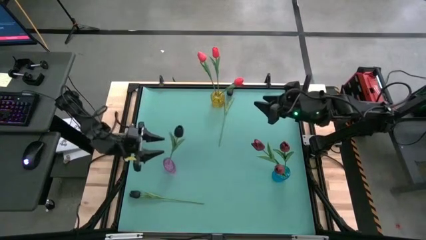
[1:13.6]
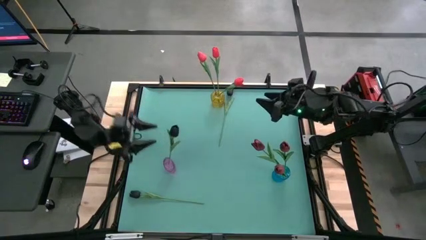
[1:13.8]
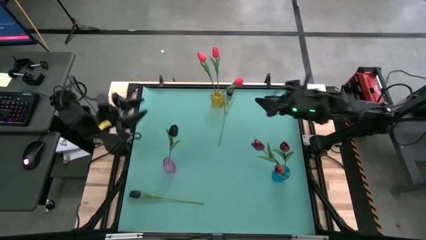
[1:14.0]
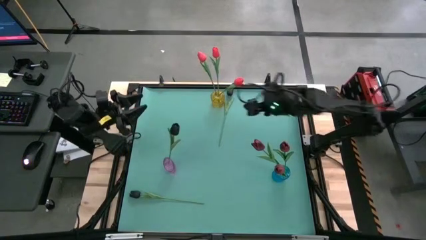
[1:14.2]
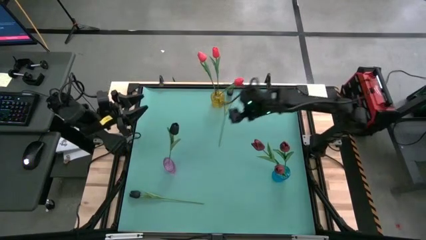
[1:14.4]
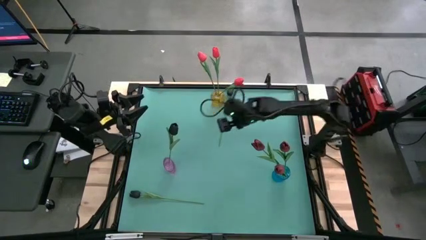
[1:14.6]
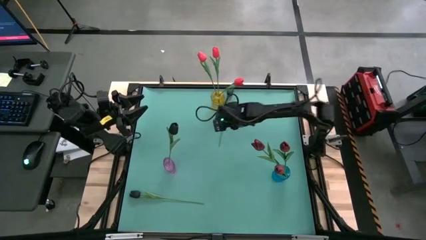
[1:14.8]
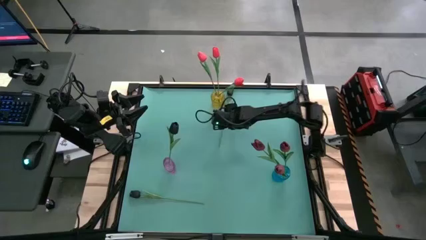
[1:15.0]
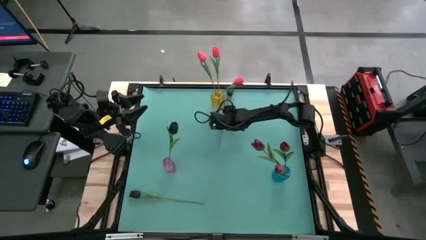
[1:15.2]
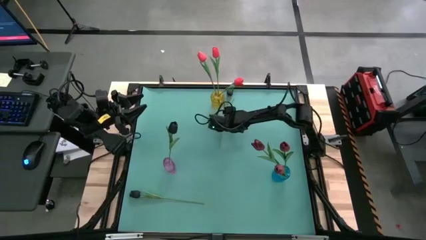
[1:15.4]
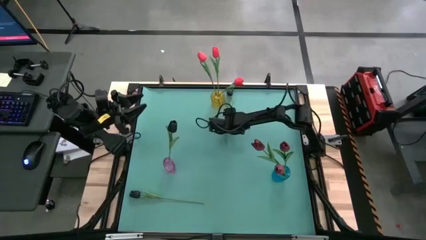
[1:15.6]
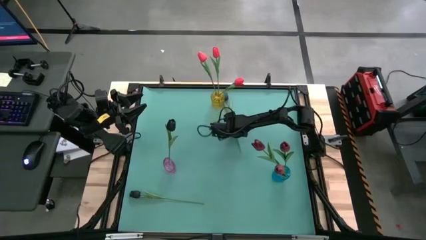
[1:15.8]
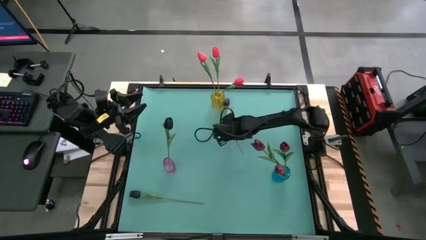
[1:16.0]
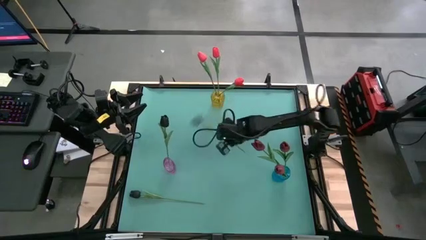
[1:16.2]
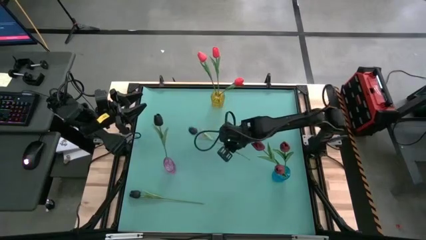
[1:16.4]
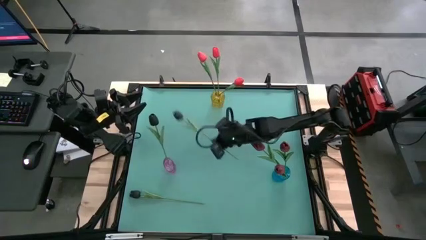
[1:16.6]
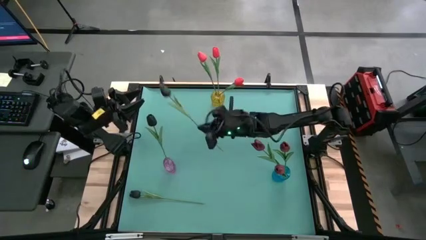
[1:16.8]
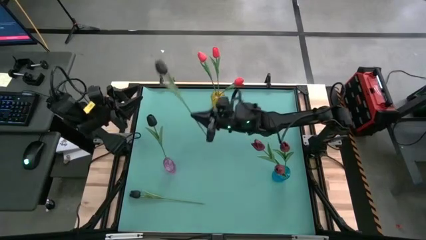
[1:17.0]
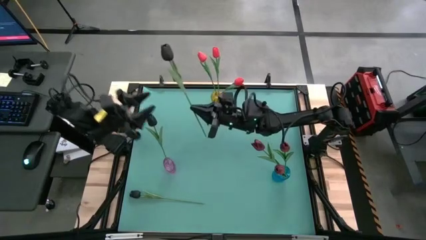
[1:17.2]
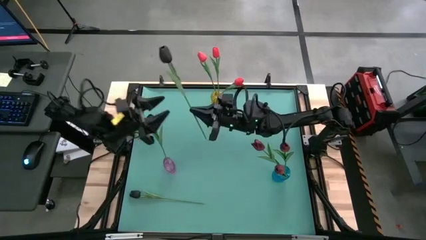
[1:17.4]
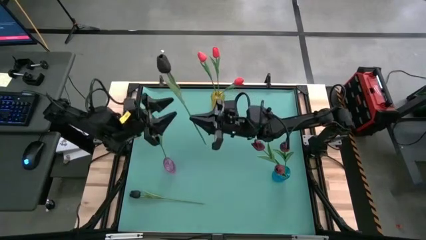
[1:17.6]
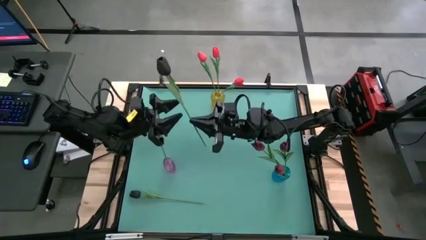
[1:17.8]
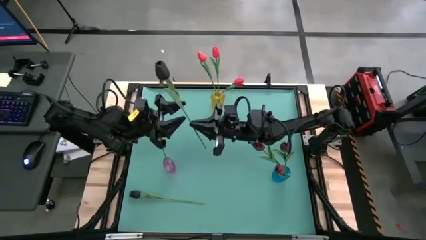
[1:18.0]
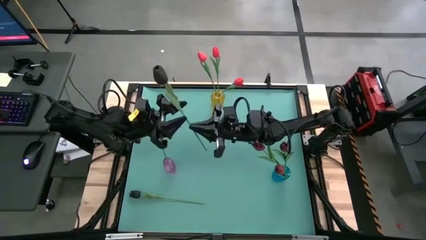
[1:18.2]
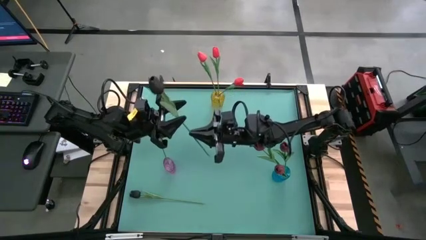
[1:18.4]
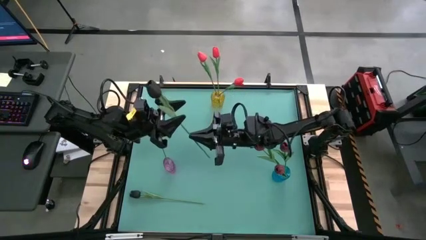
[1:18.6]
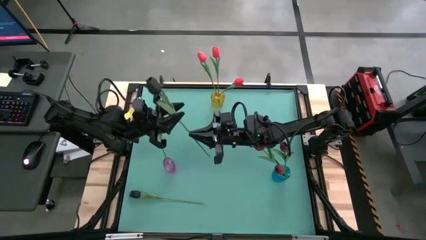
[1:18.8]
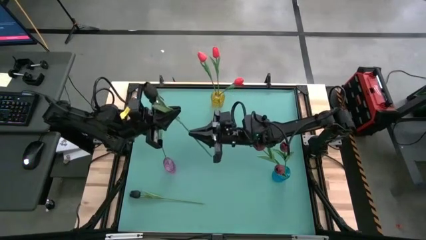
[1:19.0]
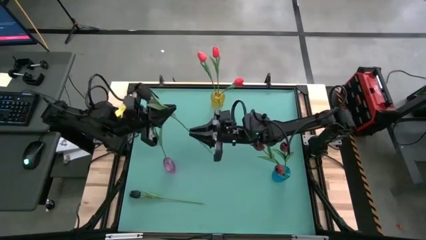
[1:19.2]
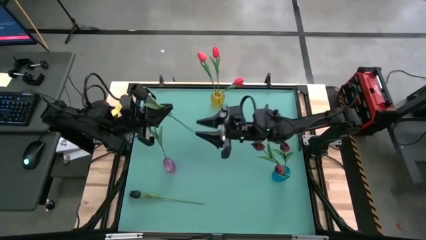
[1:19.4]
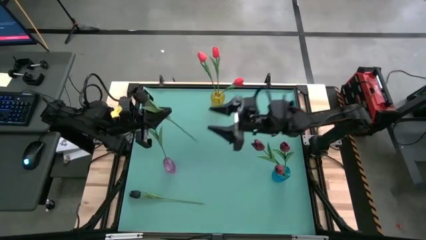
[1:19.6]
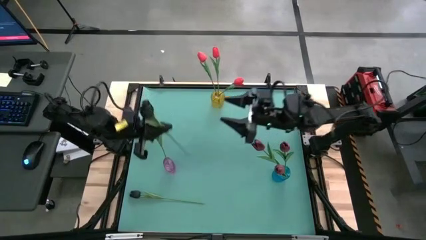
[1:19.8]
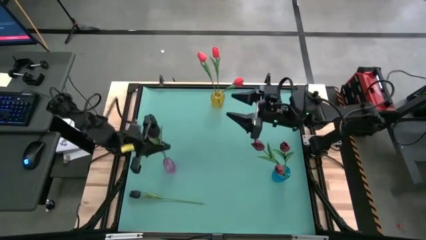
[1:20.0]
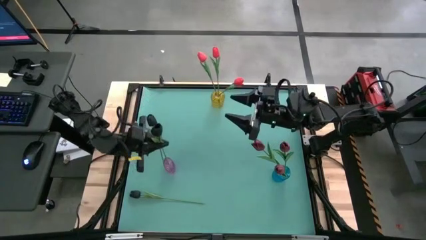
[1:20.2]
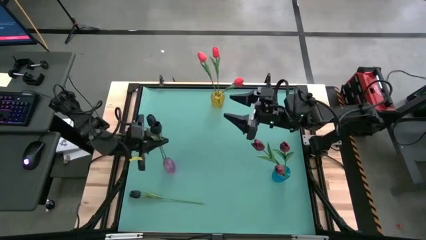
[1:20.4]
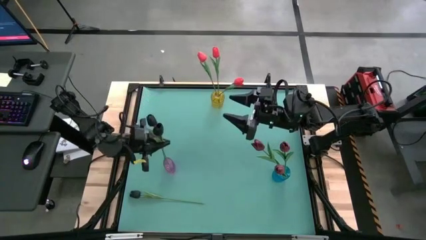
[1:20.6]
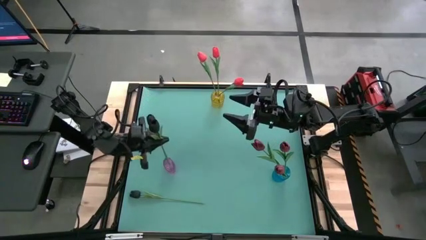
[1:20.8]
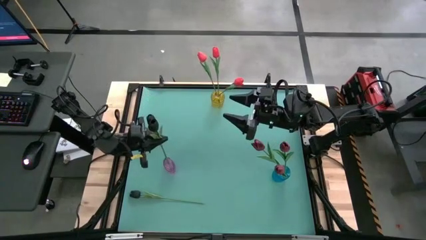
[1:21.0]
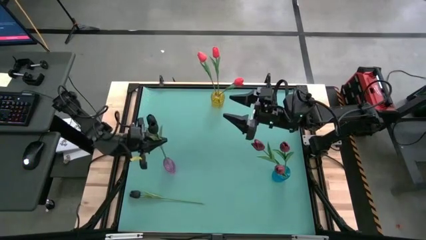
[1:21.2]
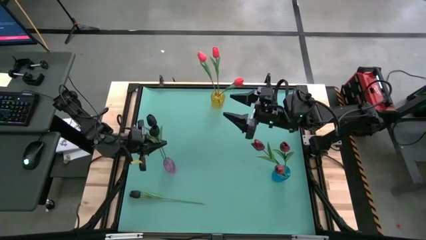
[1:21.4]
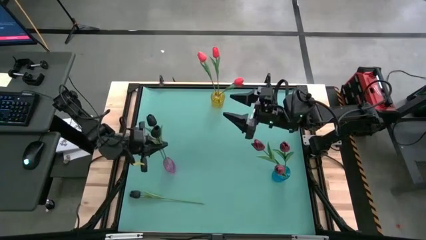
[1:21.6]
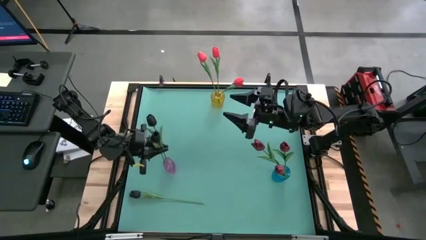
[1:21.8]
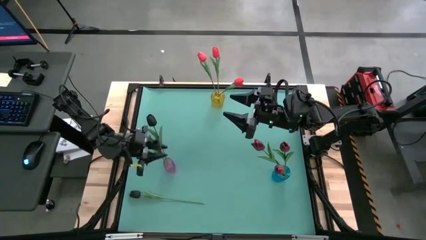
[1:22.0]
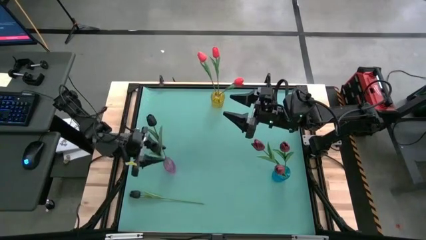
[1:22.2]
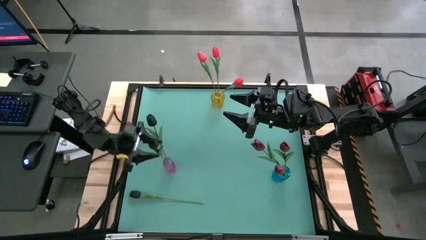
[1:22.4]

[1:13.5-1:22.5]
Task: Sort flowers into vase by color
Put the top black tulip into the violet vase

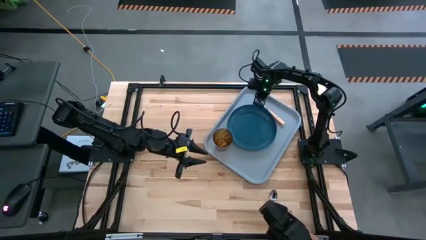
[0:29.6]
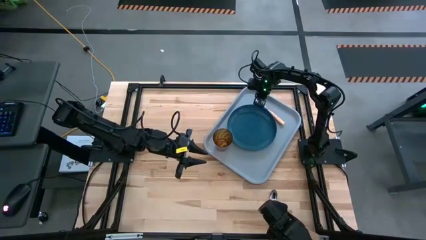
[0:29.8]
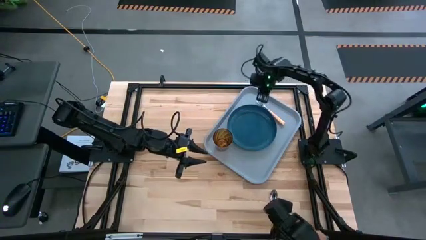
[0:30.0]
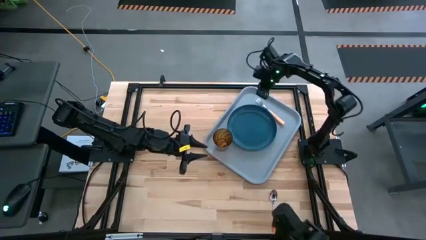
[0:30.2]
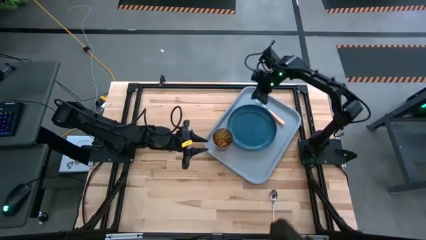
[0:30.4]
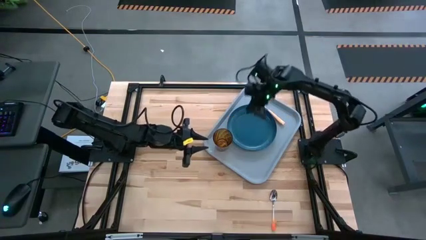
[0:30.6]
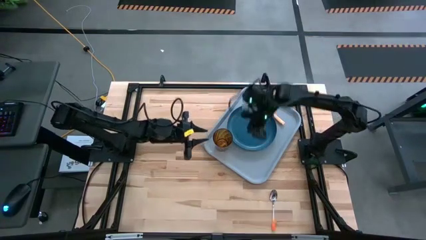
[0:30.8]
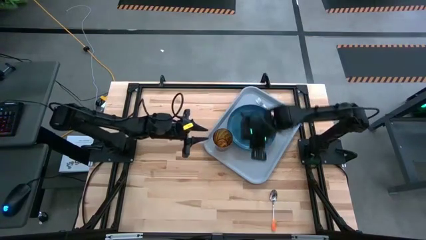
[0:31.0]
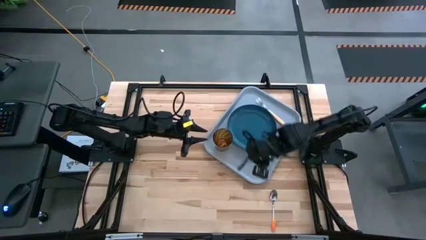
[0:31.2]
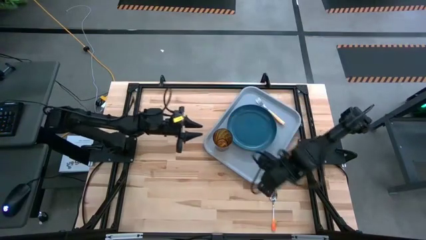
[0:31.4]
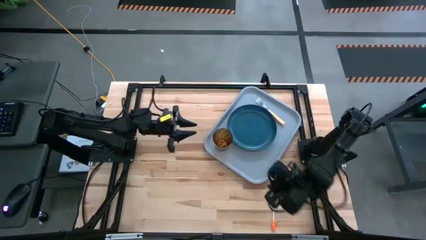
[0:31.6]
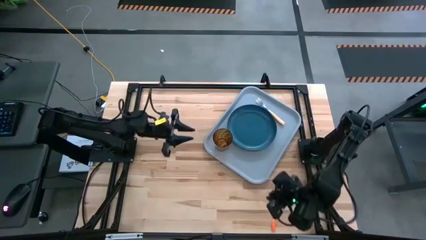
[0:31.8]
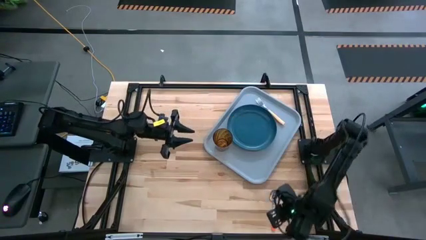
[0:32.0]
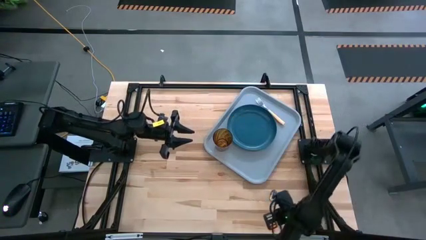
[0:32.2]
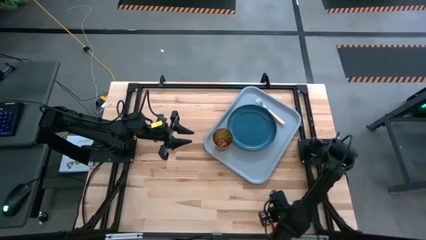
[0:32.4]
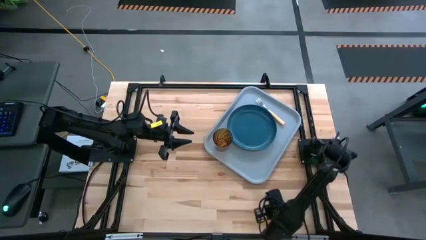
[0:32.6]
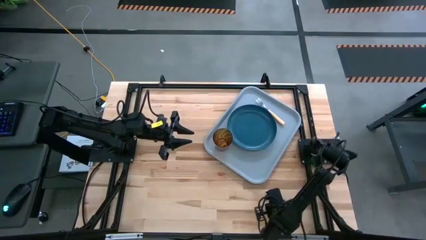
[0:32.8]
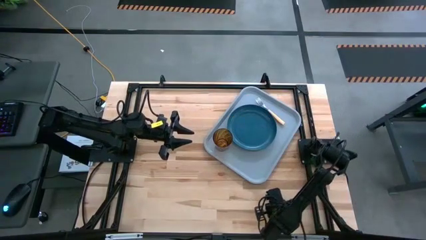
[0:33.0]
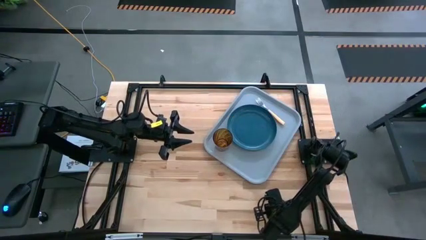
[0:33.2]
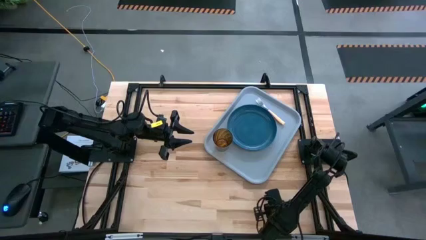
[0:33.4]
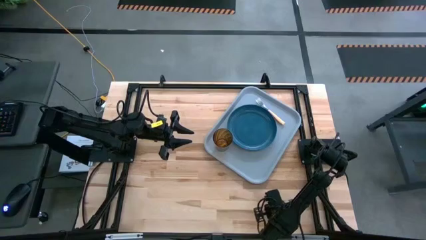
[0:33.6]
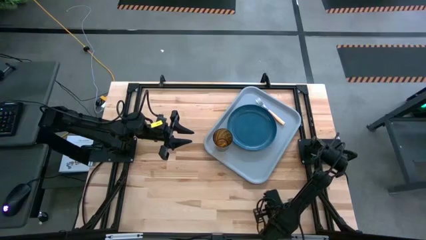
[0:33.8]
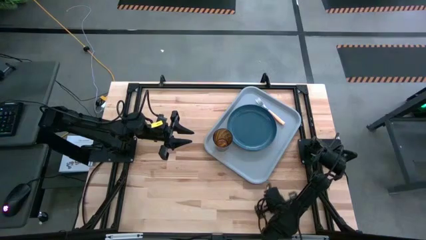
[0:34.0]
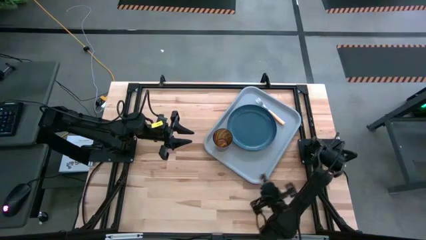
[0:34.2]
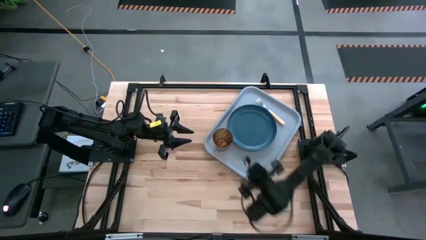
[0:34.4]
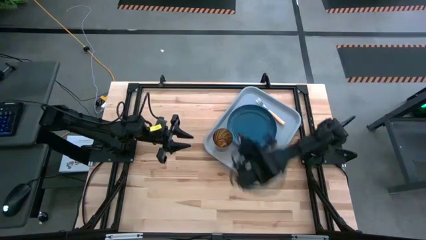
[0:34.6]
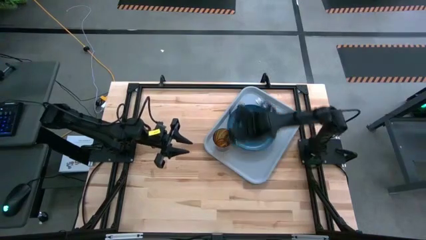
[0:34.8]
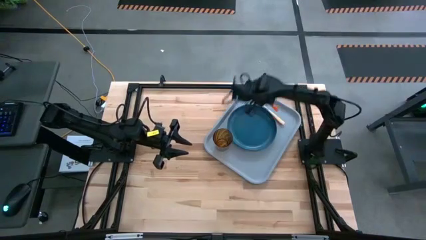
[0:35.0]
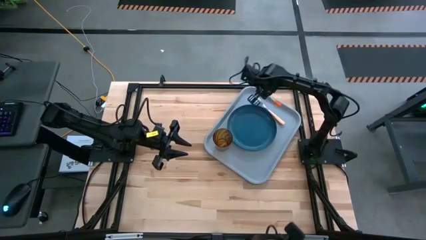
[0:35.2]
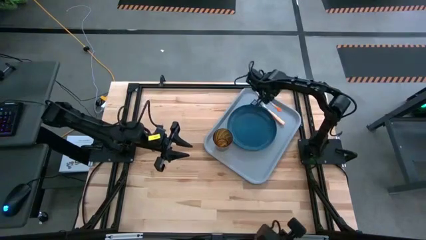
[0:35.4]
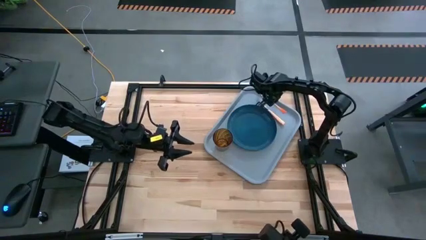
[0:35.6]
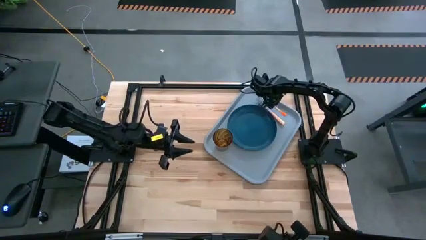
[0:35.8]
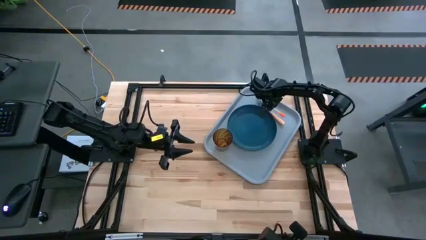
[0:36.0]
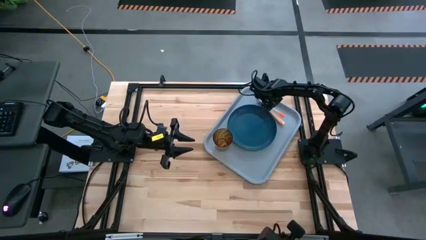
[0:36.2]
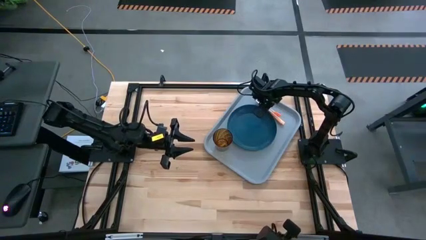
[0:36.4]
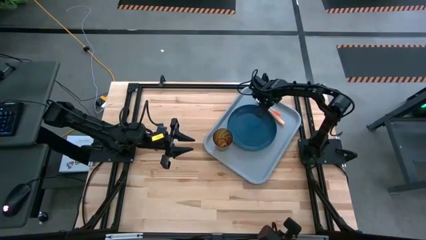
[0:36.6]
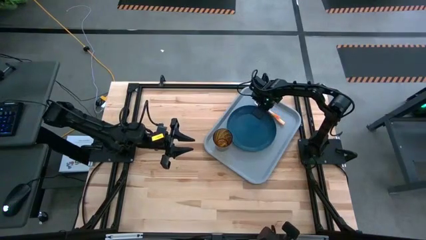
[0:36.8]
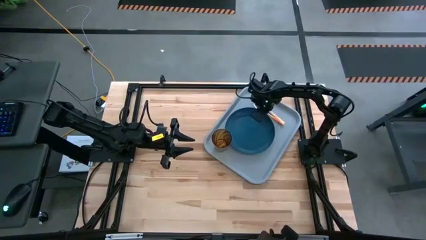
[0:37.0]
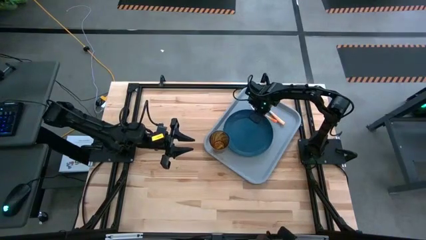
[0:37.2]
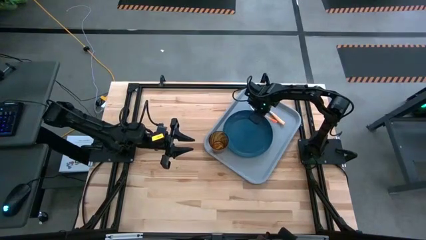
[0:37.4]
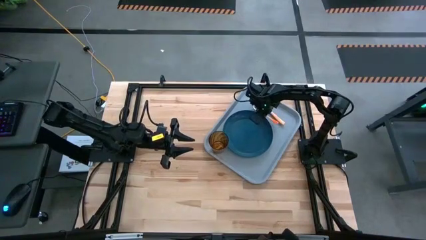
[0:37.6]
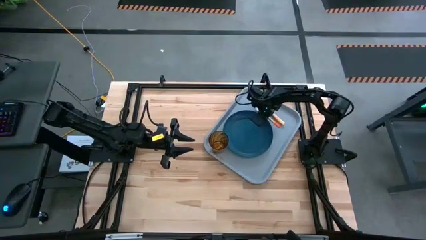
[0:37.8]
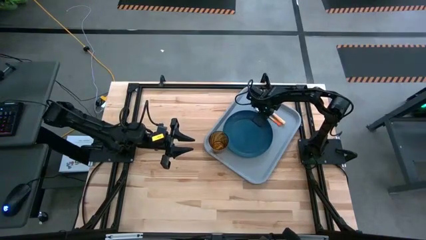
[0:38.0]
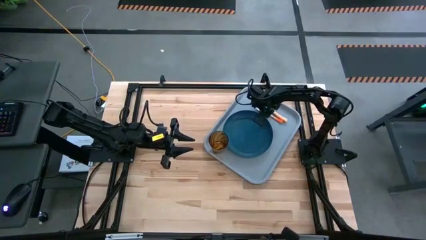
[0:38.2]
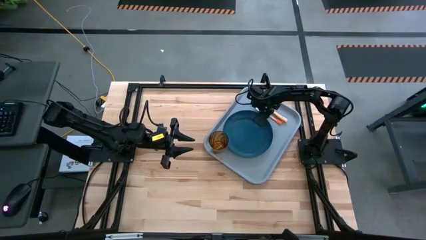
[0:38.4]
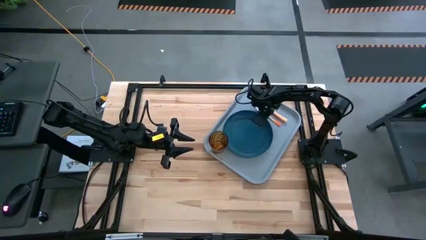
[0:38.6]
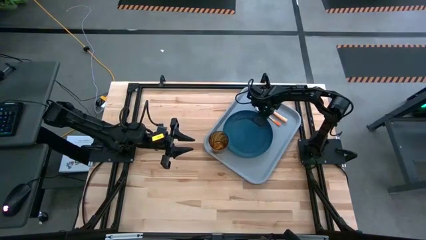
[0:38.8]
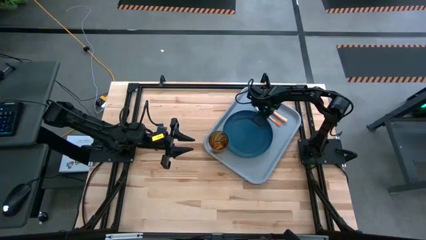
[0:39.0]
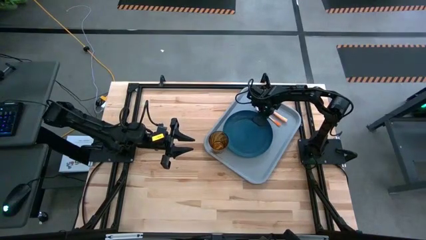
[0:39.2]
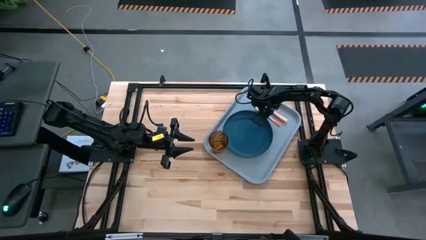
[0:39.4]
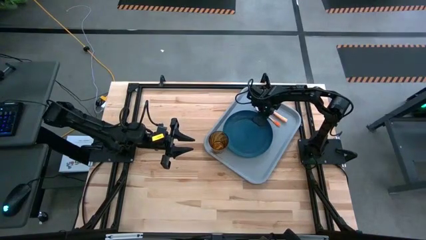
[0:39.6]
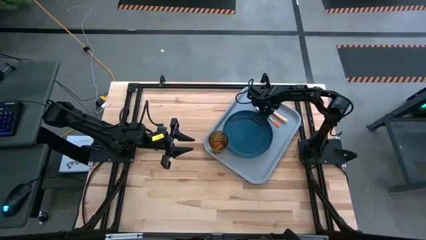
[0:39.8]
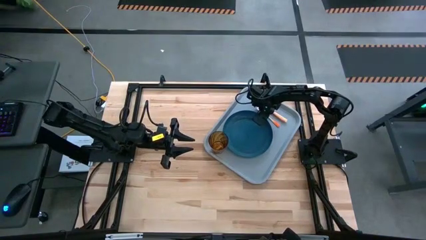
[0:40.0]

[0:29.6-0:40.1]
Task: Pick and place plate/cup/fork/spoon on tray
Put the orange spoon on the blue tray to the right of the blue plate
